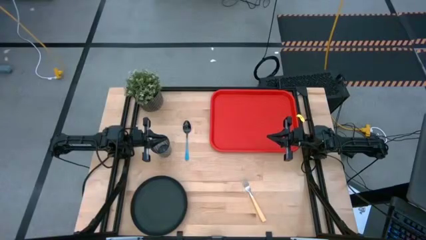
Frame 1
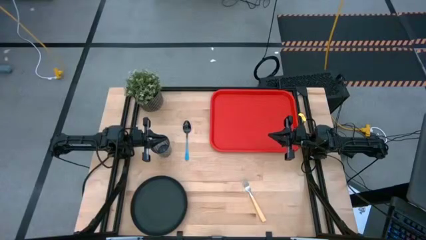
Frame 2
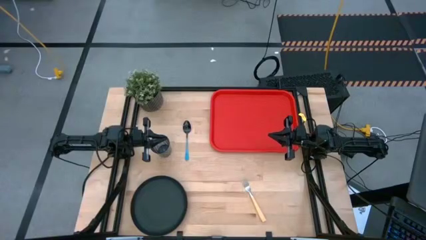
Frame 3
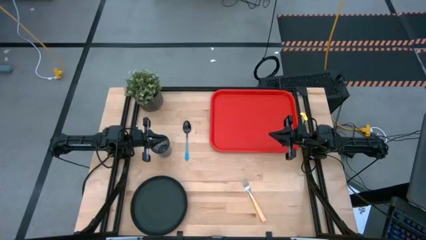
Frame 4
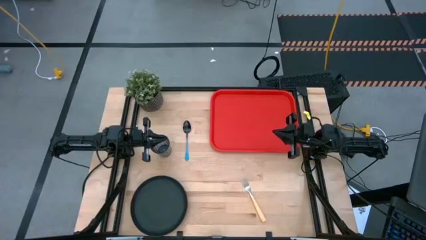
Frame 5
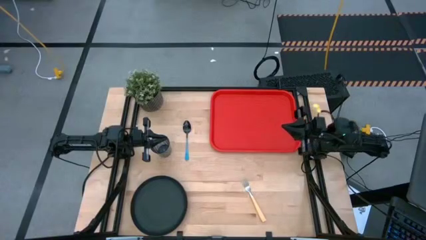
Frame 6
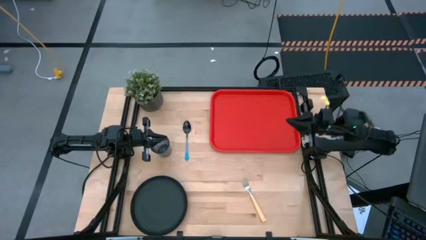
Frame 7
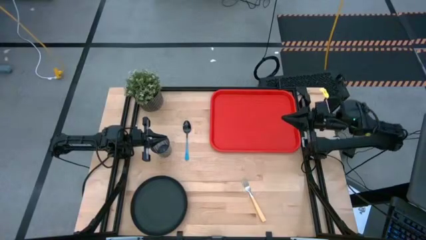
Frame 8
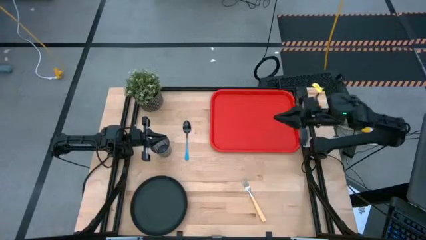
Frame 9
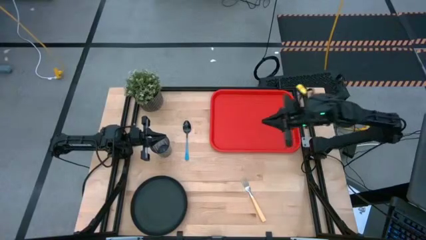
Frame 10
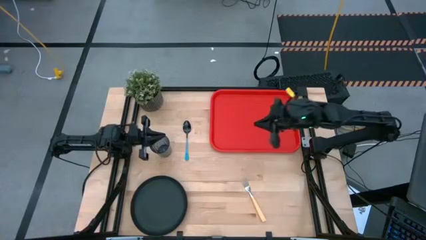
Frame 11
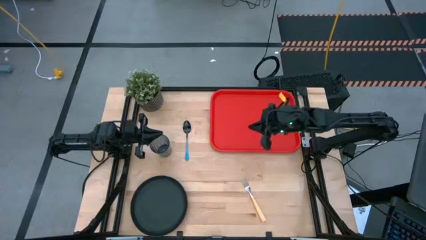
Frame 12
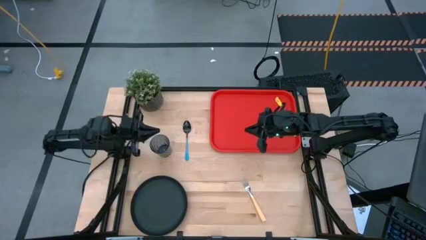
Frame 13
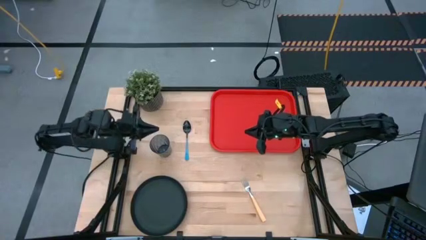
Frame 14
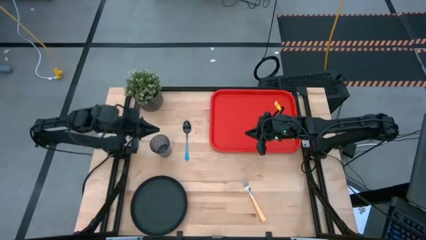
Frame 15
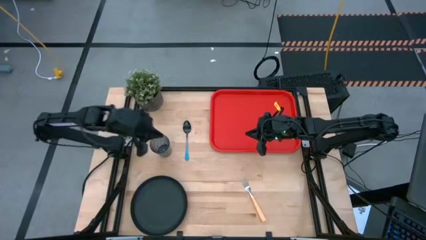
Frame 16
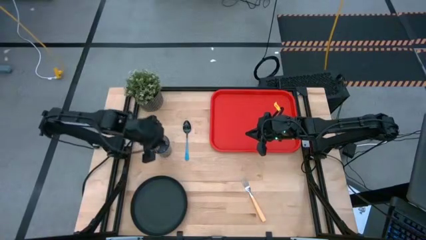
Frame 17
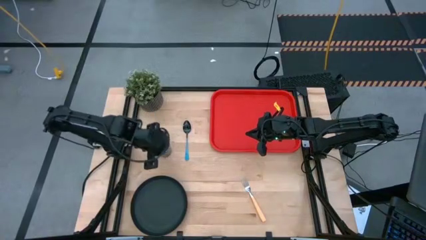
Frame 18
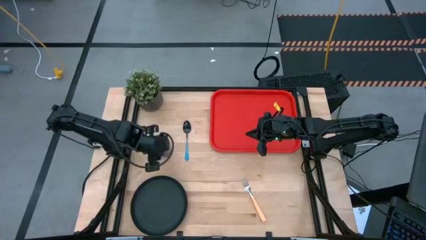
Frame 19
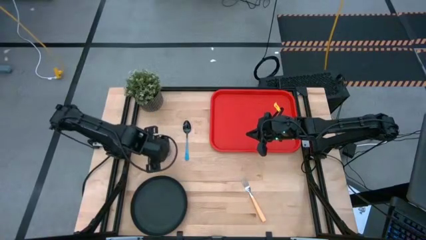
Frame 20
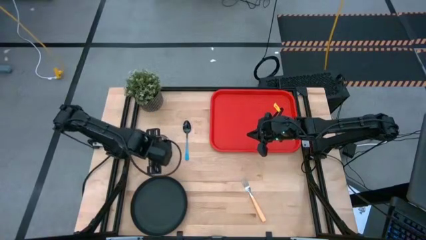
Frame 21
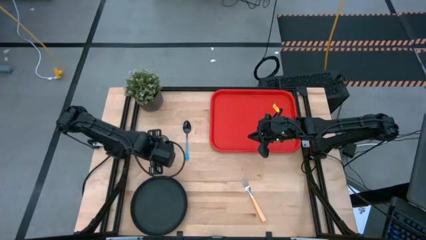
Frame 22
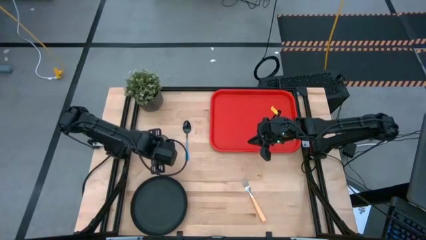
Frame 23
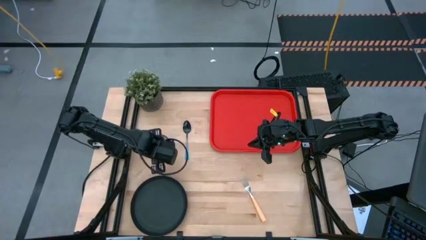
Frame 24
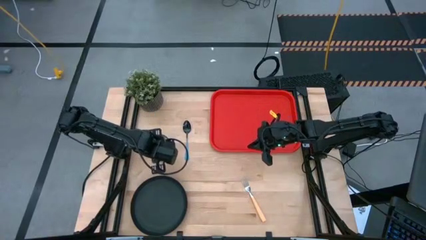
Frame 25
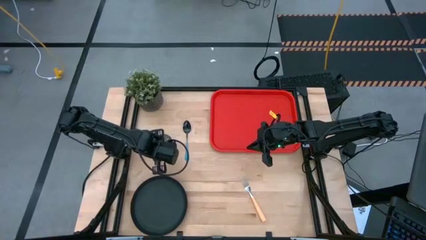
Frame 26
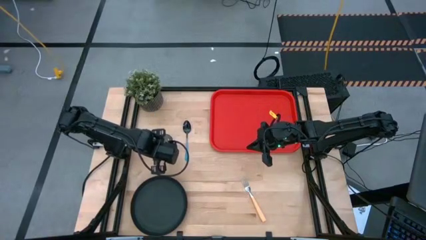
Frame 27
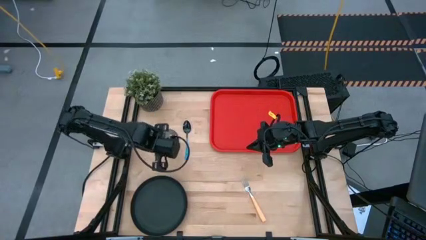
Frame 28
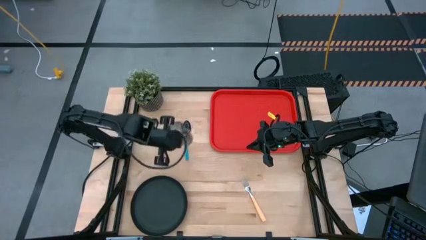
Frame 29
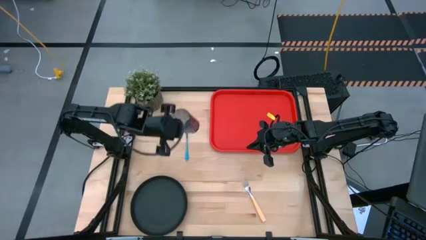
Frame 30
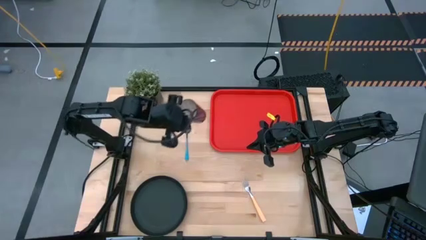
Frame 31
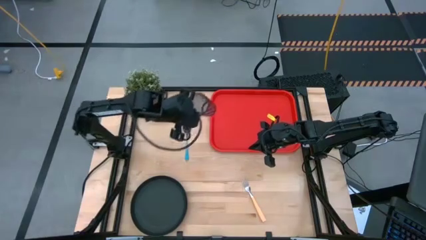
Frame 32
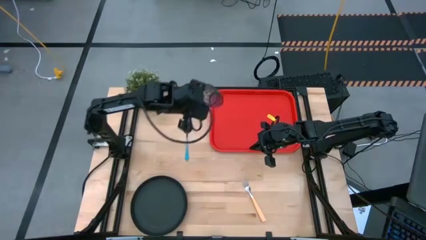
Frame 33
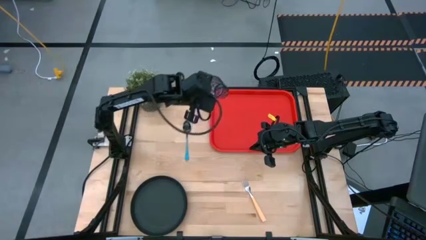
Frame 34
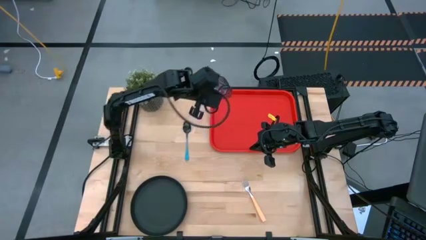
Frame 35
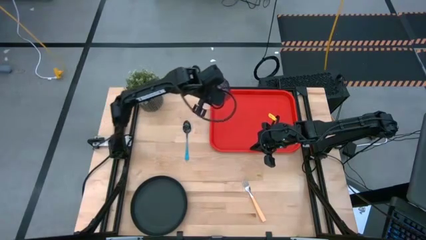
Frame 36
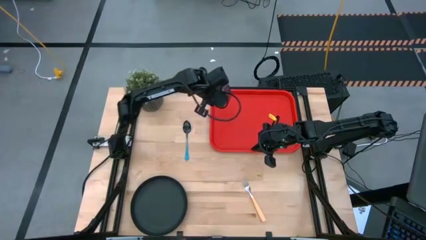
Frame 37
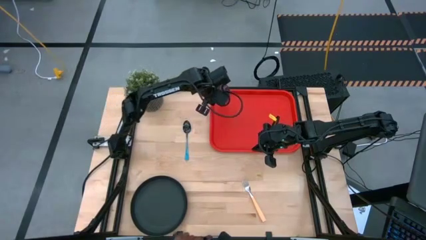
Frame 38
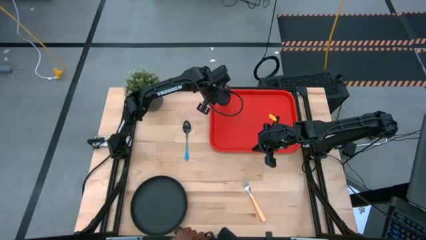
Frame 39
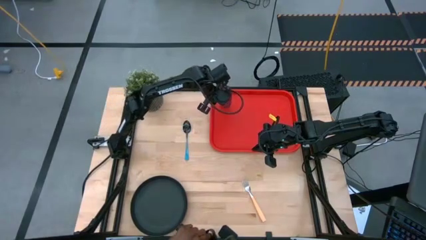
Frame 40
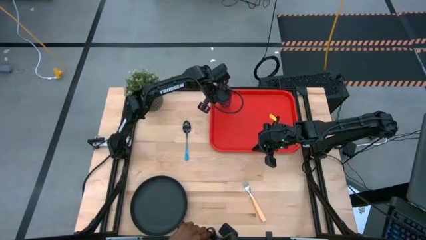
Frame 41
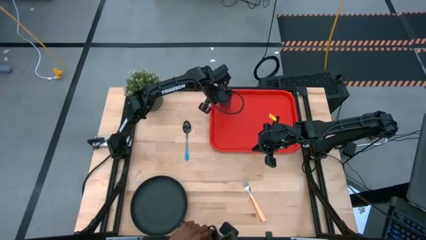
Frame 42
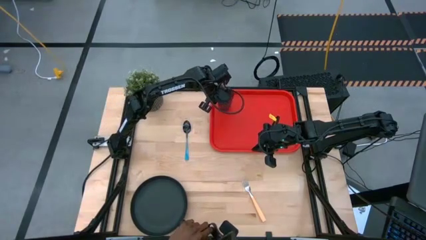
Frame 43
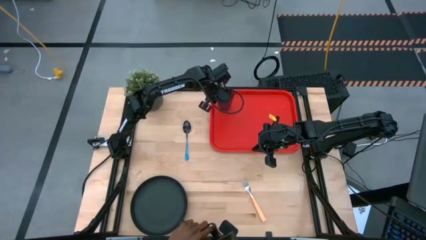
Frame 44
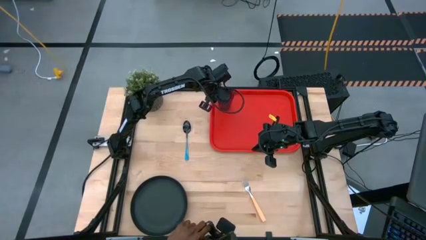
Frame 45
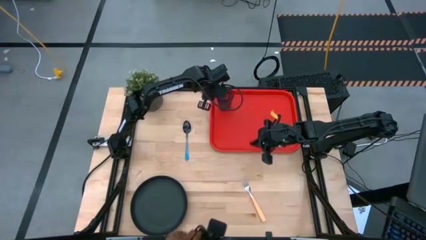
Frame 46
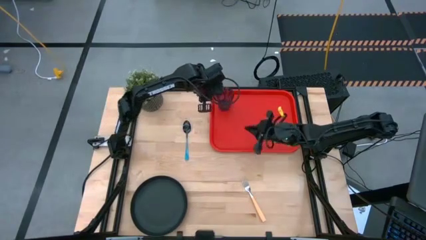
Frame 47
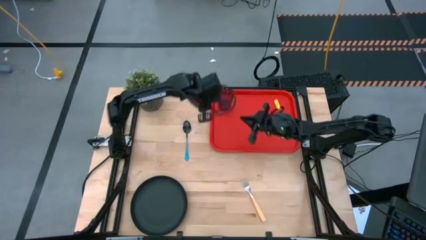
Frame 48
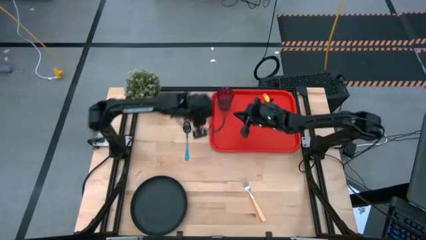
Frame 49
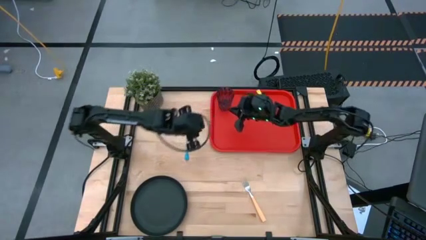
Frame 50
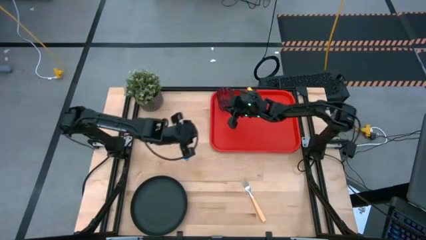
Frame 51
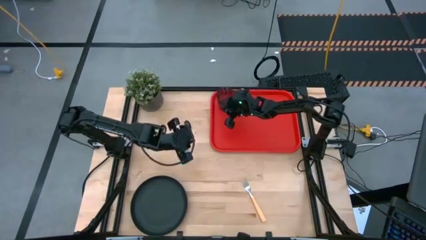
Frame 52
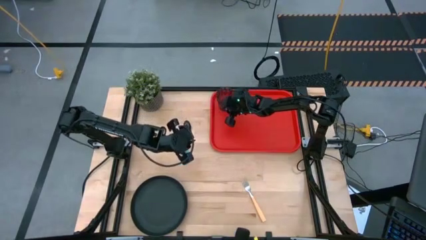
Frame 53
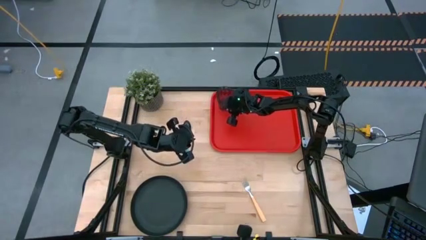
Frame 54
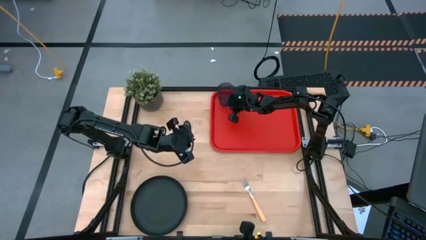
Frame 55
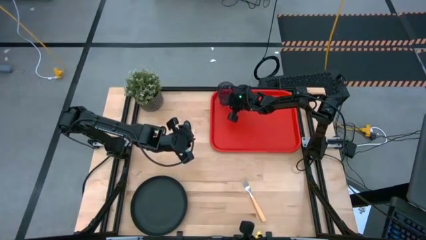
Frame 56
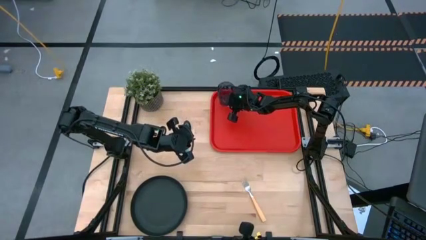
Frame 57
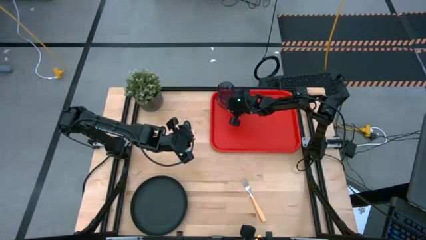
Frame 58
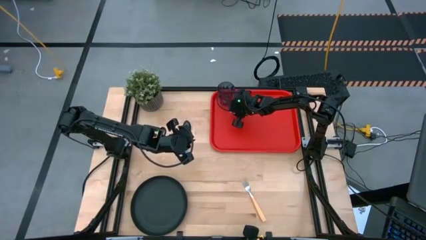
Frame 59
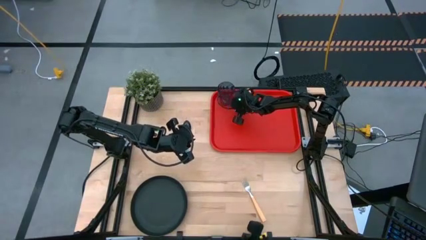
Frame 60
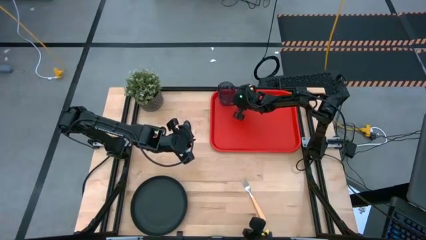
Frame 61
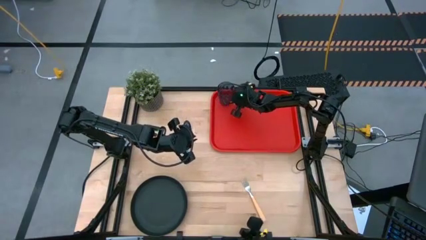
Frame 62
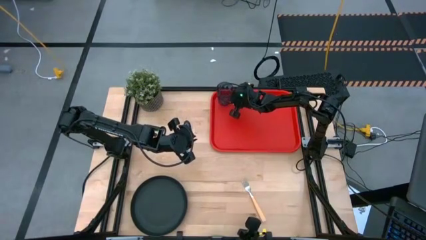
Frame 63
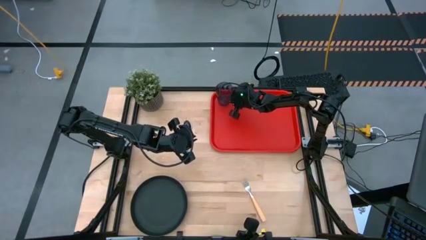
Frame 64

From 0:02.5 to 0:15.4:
Task: Pick and place plate/cup/fork/spoon on tray
Put the blue cup on the serving tray

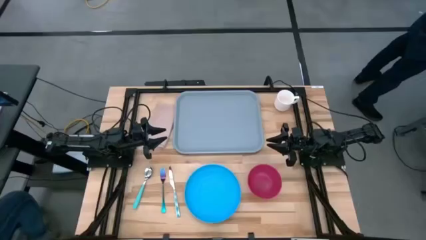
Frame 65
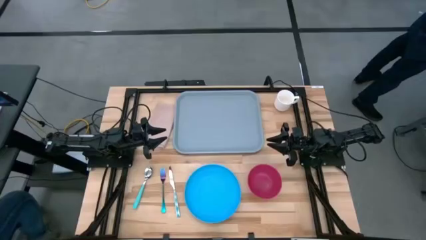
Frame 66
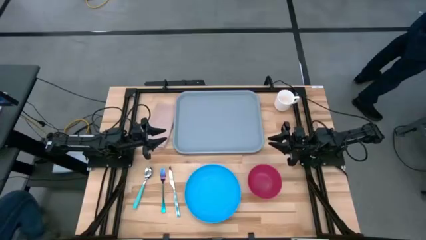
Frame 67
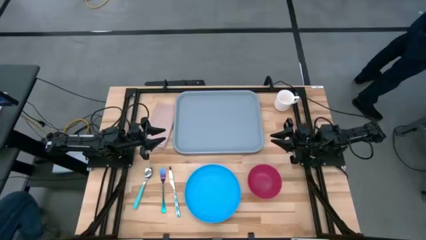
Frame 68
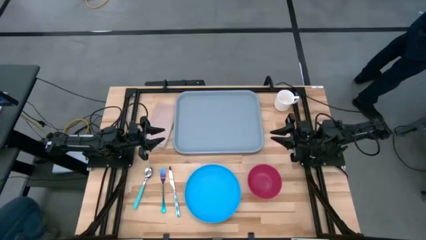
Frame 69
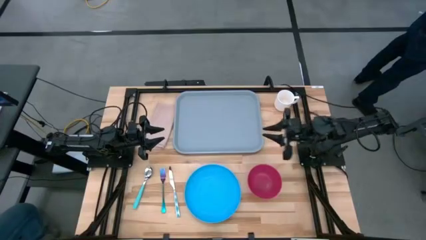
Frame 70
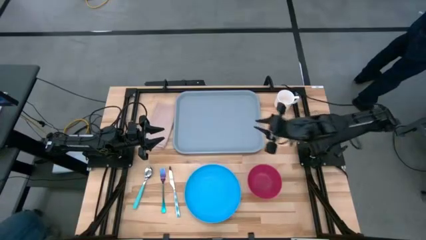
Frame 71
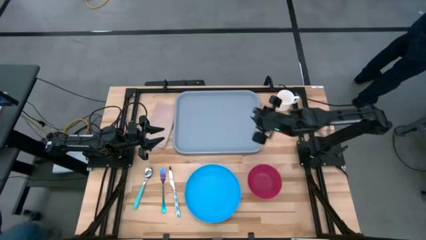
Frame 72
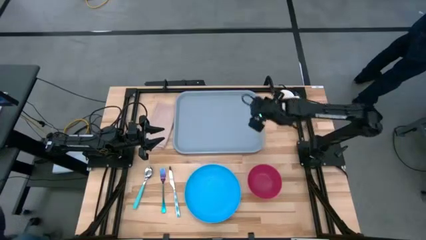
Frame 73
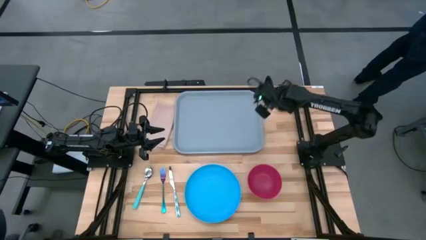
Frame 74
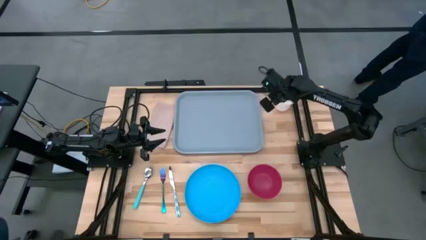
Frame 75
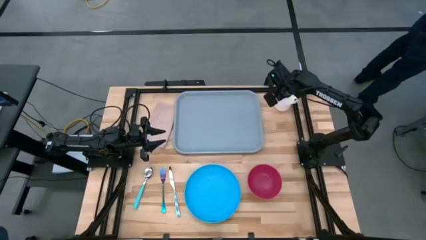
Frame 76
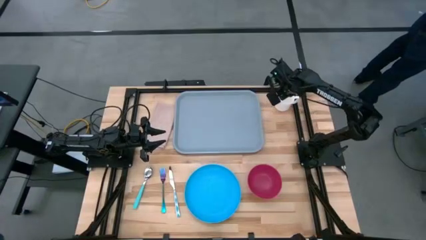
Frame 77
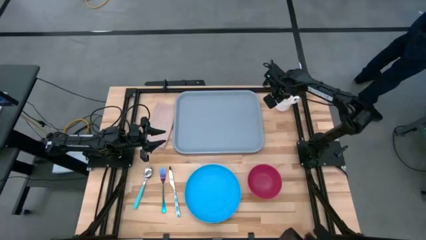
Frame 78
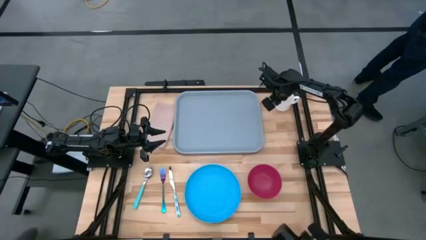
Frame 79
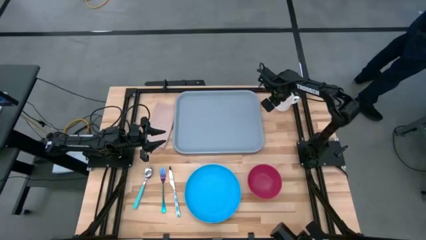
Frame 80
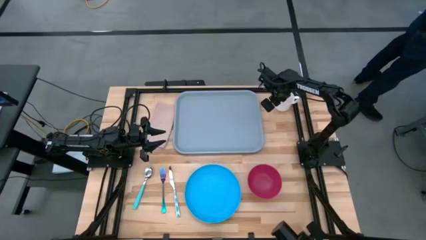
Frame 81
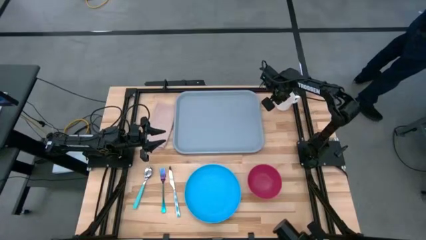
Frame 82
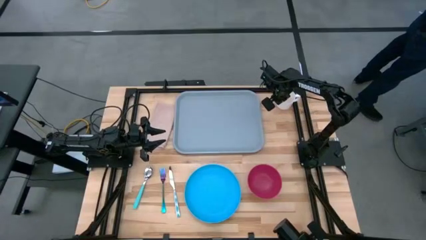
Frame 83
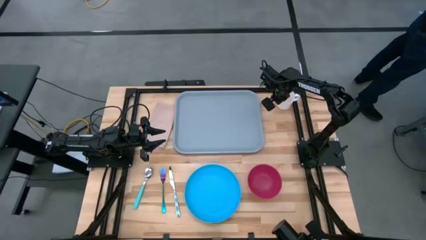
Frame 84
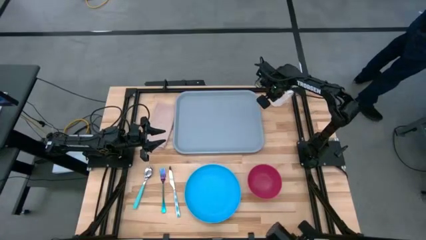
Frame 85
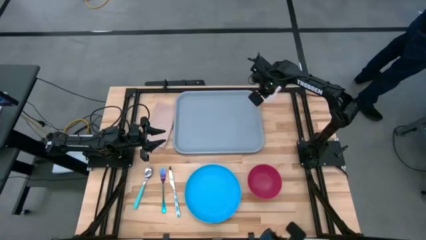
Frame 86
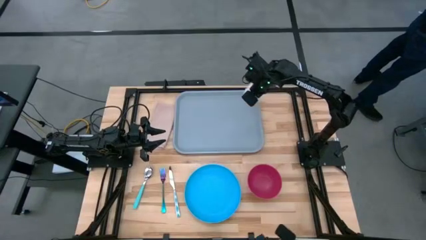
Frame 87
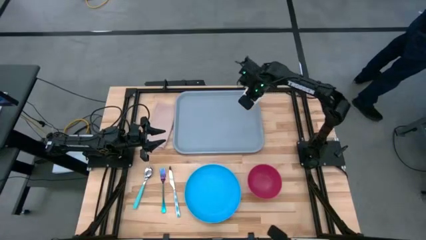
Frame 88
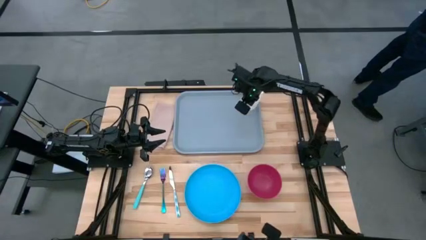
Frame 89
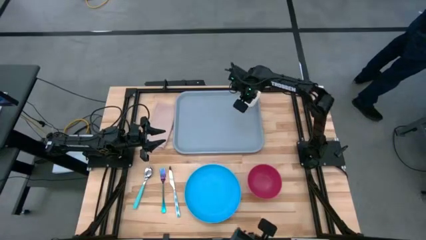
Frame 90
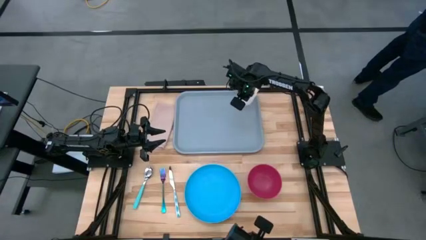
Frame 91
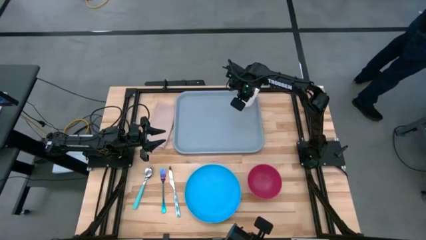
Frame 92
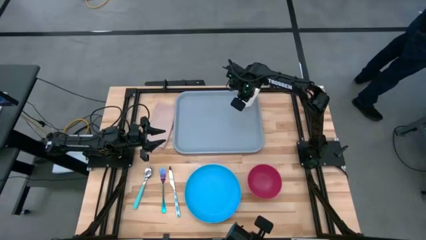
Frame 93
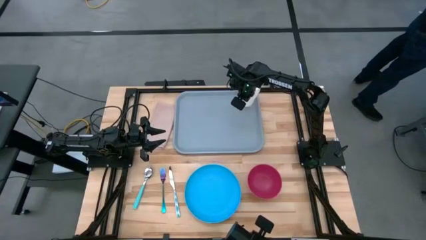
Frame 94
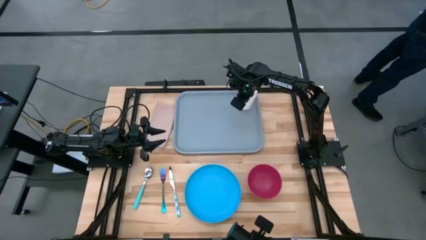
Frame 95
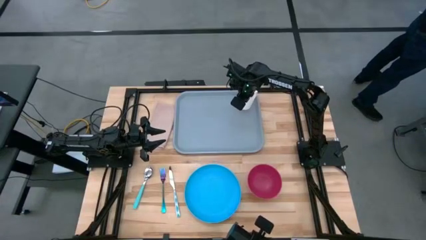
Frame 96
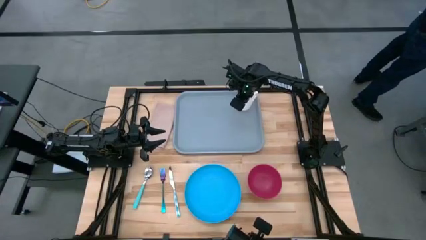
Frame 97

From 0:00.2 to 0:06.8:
Task: Set up tray
Put the mug to the top right corner of the serving tray
